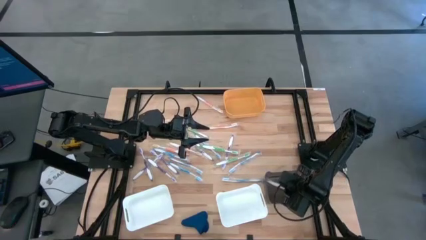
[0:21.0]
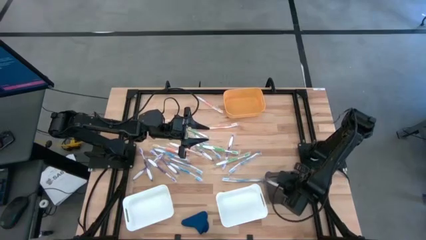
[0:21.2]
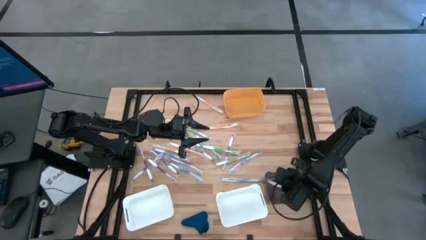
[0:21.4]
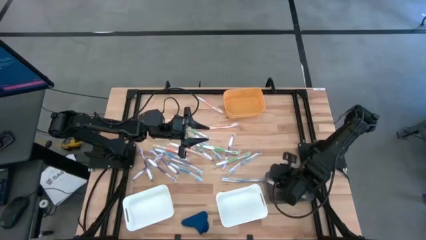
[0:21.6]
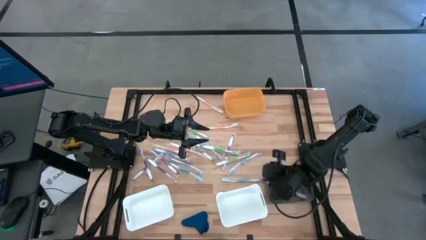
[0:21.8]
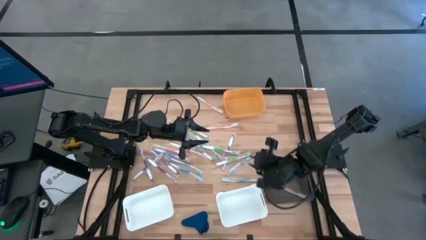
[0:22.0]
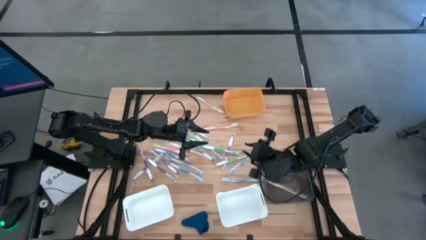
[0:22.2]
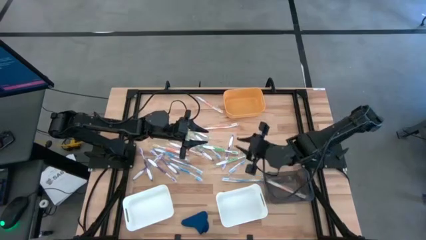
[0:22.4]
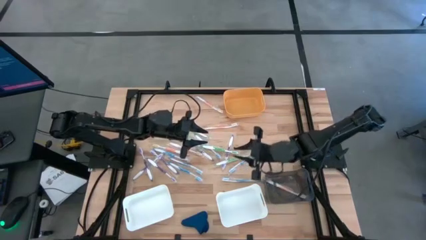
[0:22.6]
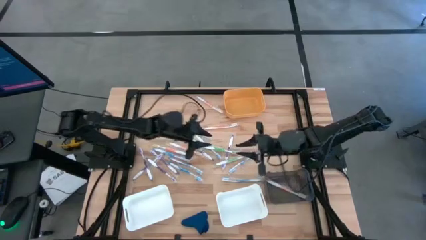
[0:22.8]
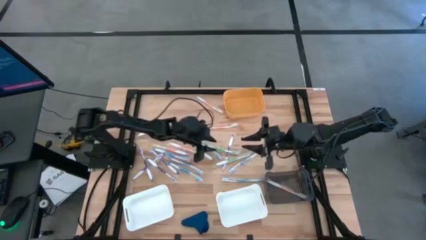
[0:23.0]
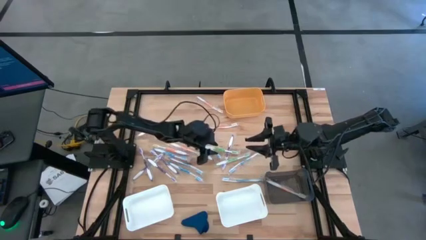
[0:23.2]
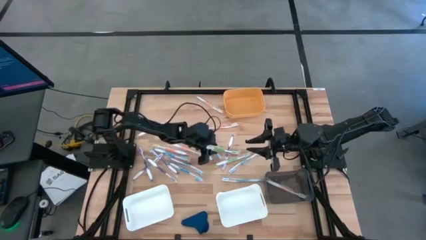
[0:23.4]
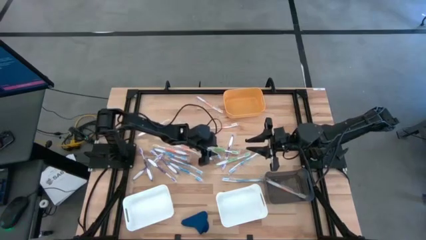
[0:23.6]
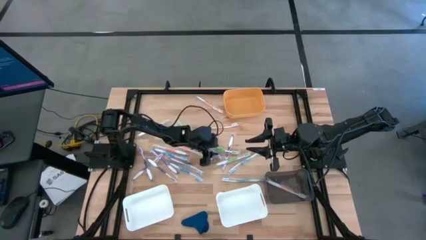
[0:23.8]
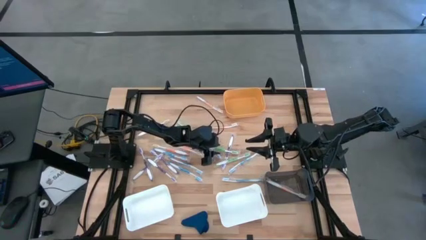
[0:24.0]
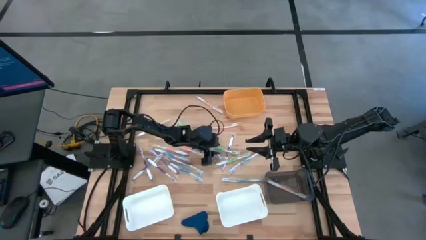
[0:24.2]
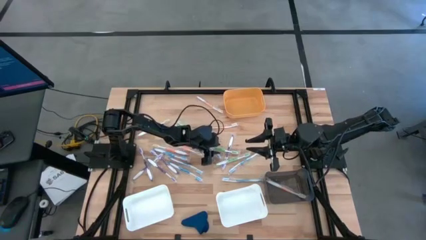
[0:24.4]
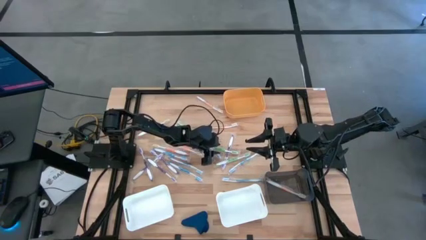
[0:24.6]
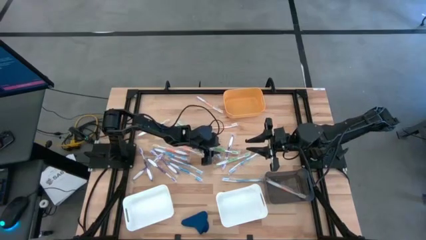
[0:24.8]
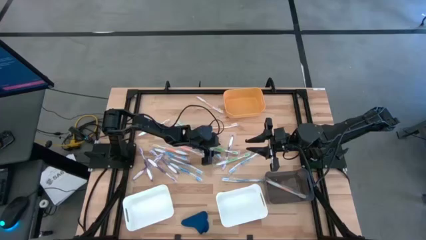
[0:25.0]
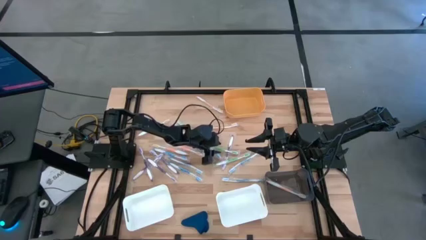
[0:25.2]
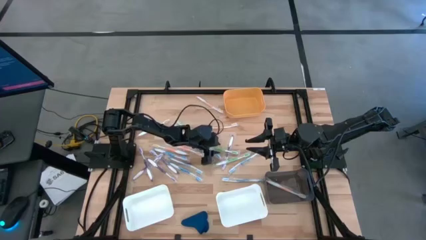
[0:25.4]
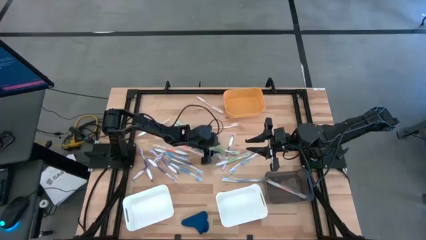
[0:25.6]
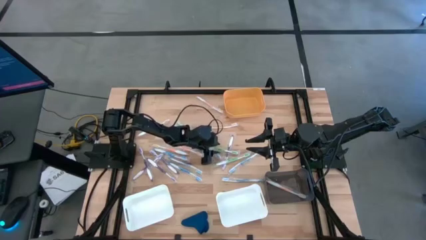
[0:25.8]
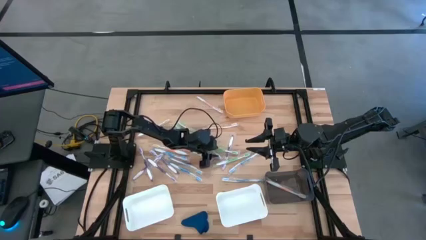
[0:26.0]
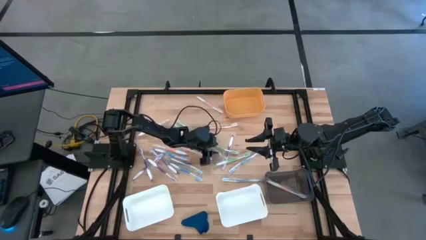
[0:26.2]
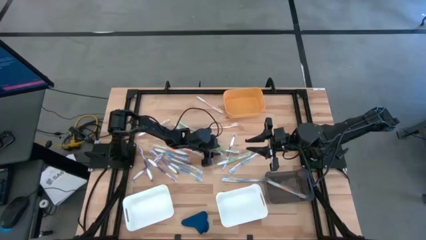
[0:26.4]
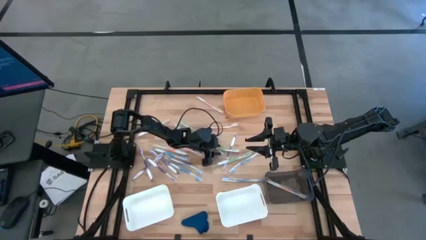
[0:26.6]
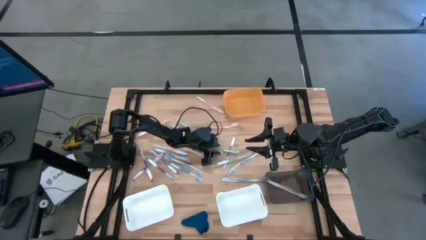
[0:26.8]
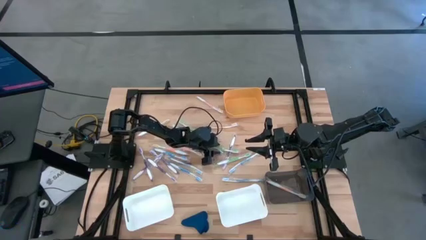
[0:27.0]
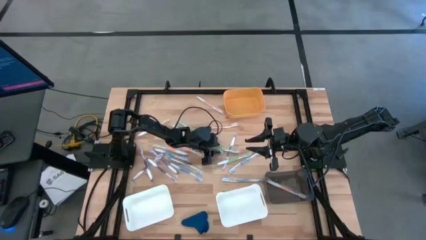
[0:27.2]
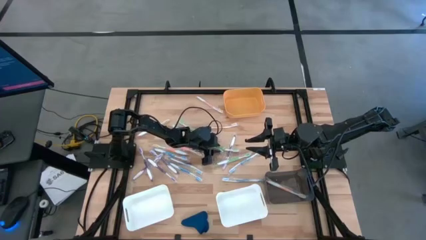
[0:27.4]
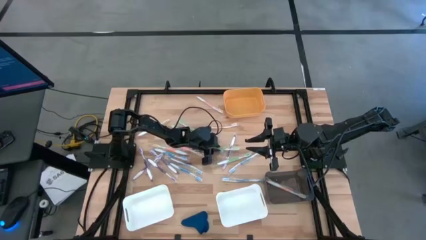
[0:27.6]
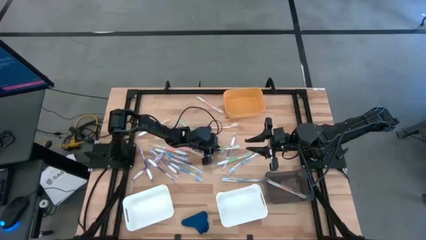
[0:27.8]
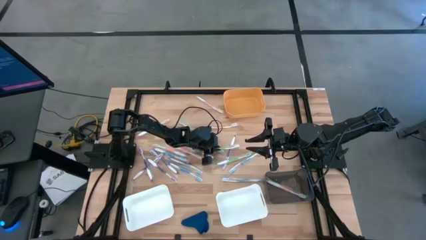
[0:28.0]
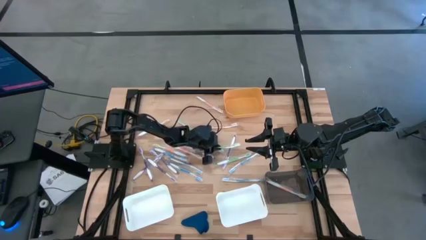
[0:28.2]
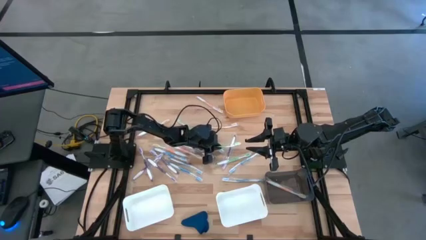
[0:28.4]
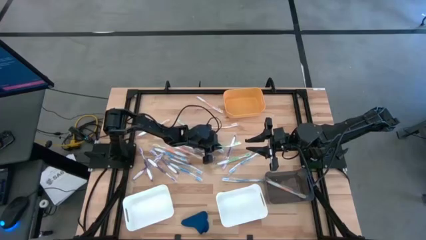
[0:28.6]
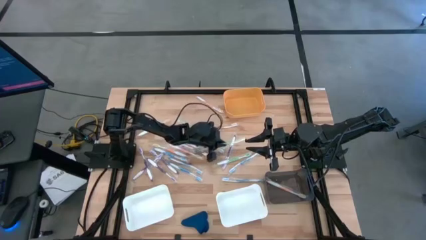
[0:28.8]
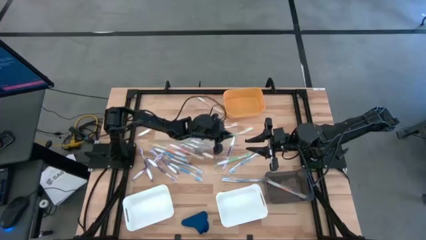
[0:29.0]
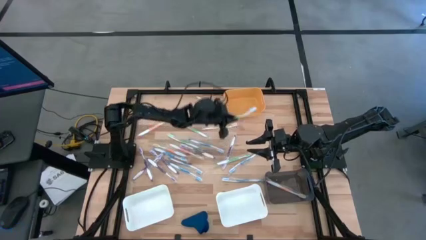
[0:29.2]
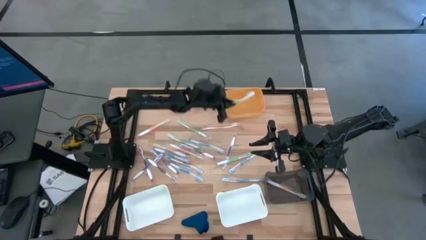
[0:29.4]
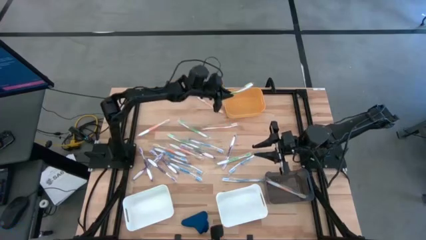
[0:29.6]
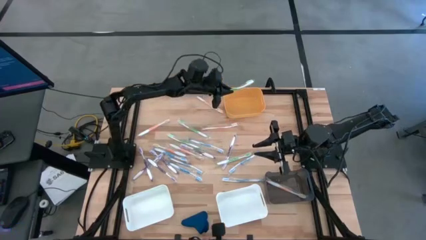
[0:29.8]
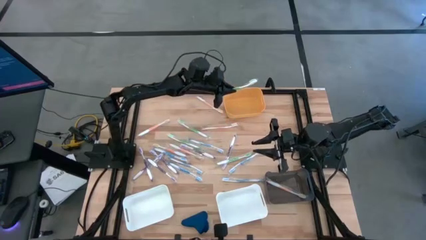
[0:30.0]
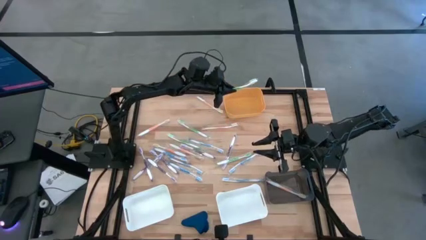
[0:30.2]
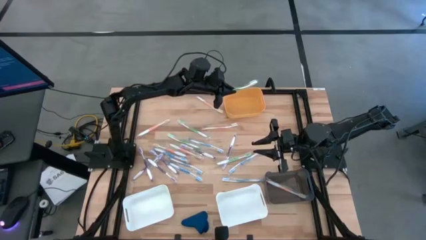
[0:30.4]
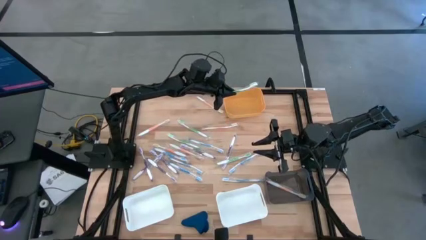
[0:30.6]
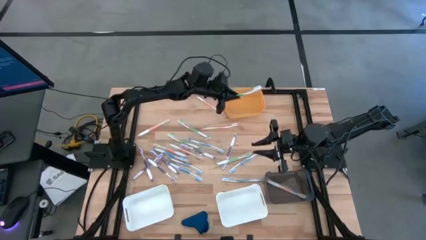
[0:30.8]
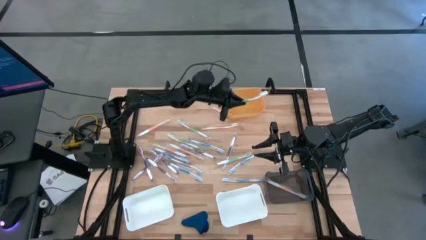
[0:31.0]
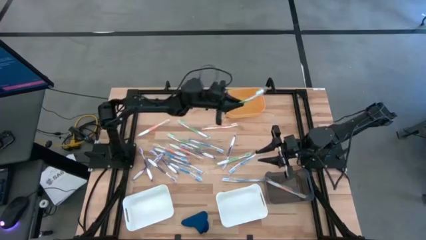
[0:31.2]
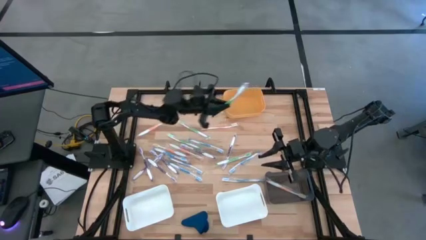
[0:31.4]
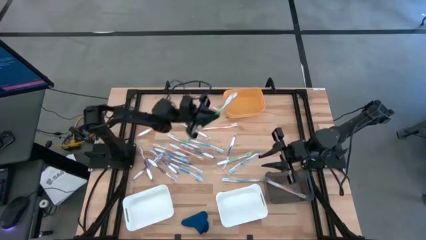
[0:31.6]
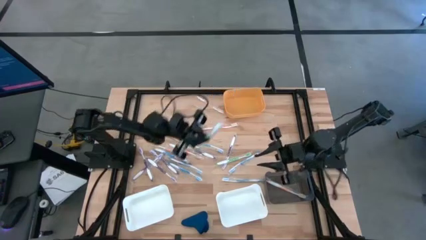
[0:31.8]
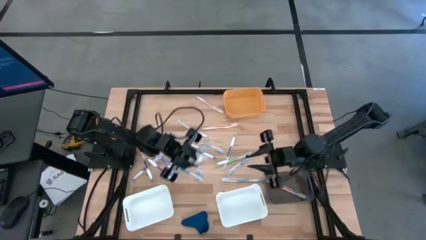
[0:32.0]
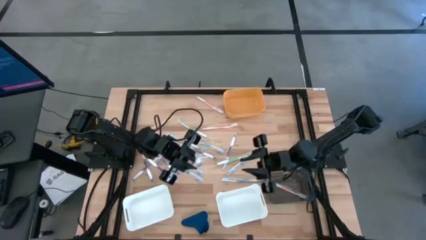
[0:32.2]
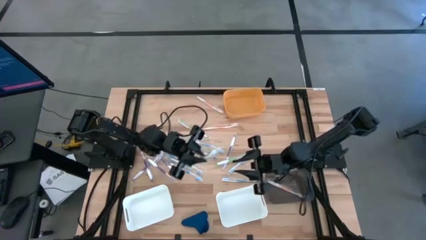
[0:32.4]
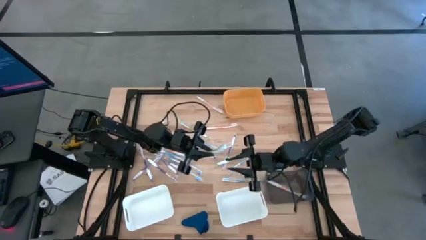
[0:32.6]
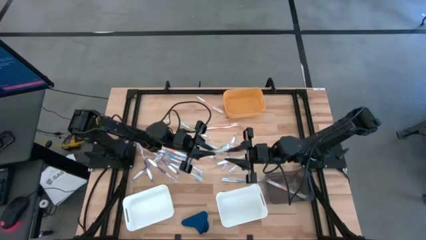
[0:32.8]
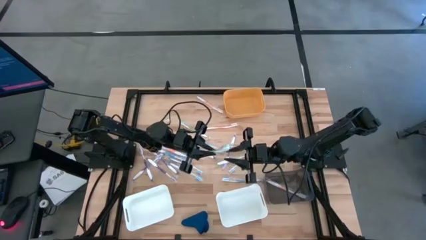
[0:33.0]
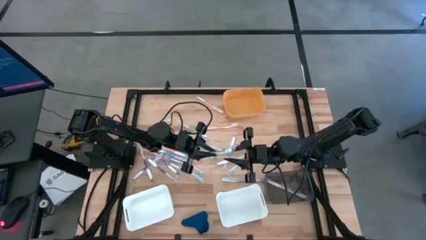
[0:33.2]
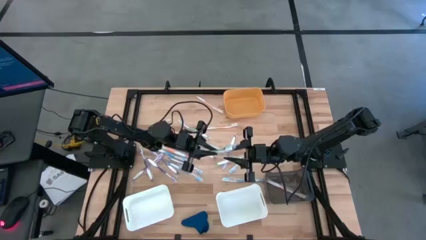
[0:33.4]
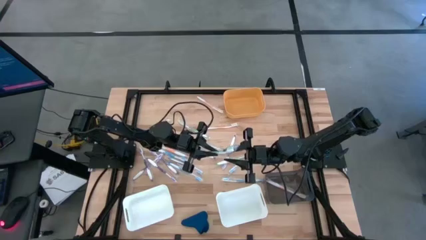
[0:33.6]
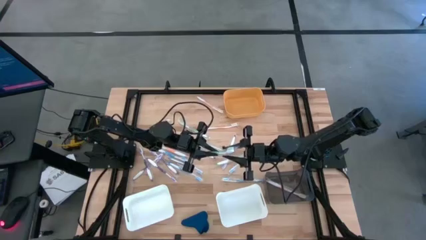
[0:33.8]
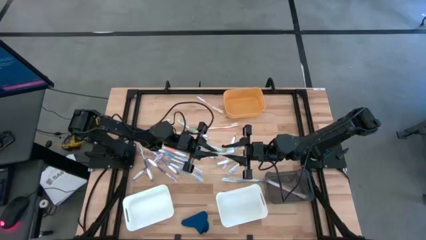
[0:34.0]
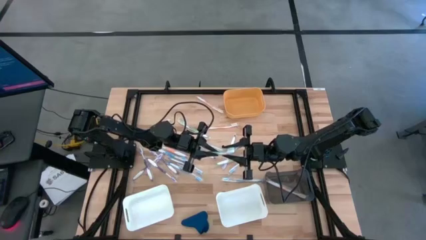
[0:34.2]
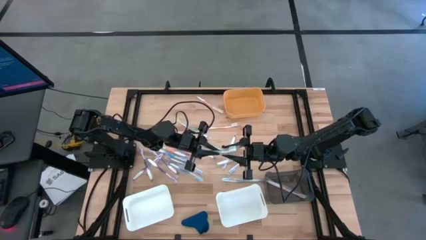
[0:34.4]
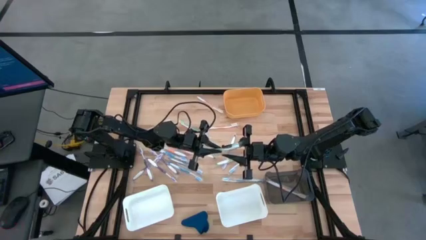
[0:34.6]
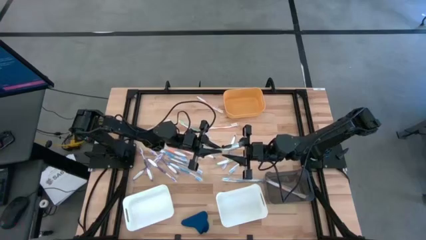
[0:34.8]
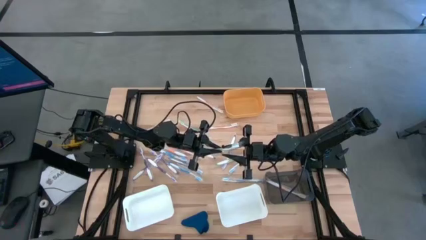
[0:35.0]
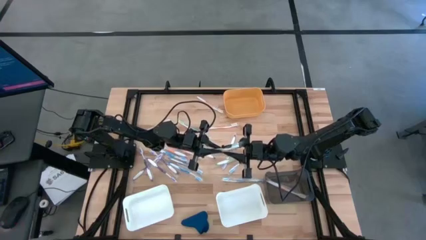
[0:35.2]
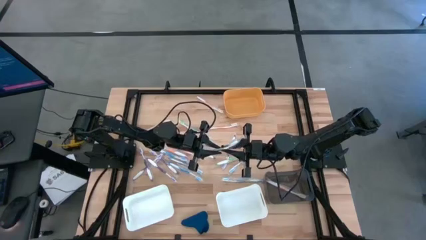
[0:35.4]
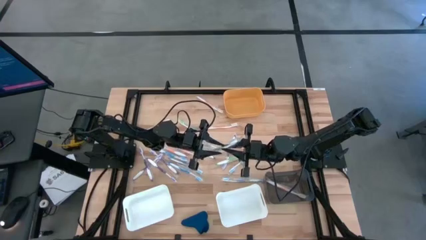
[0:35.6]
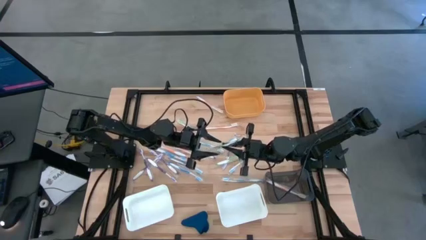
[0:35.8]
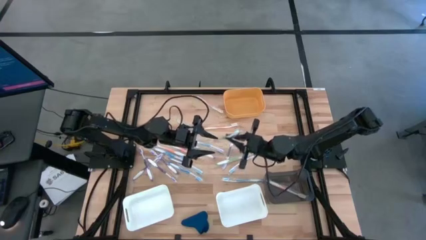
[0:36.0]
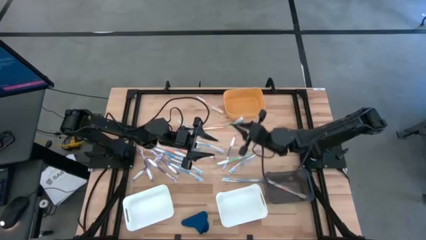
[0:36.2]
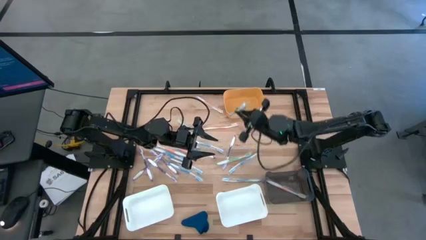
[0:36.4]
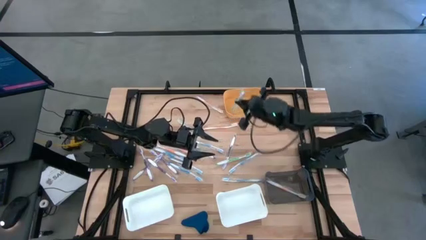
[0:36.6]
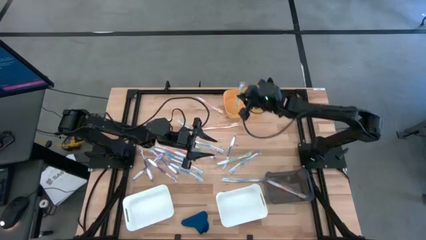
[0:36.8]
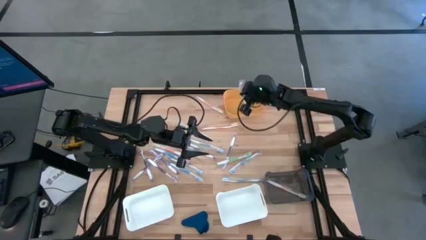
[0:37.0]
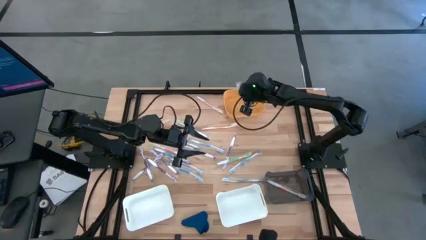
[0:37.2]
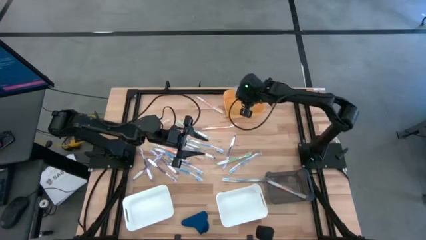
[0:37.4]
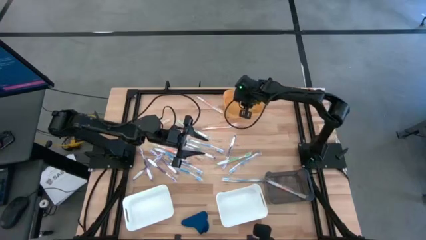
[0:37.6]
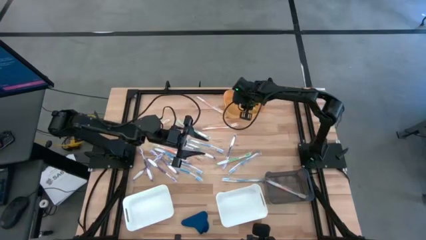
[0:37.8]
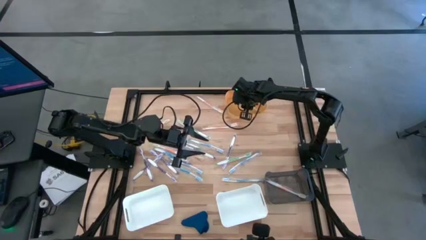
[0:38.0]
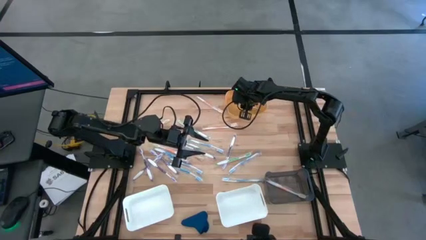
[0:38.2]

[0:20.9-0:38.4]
Task: Pick & Place Toothbrushes
Put the green toothbrush into the yellow bin
